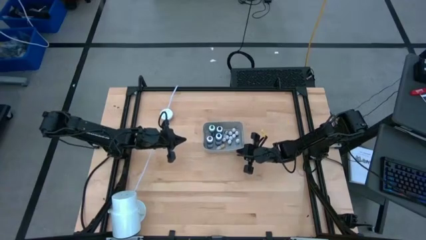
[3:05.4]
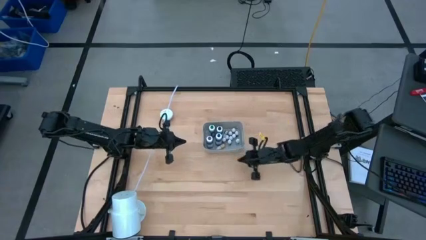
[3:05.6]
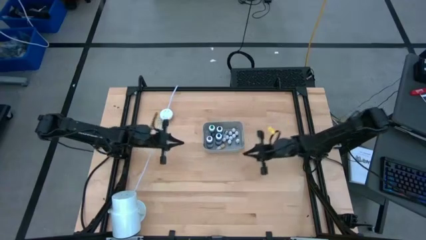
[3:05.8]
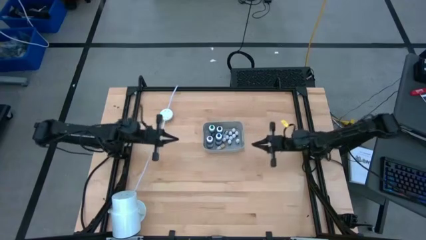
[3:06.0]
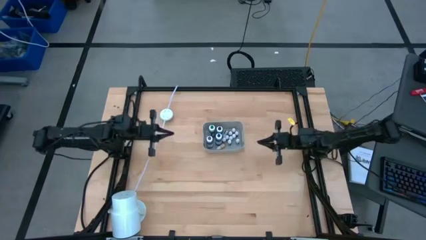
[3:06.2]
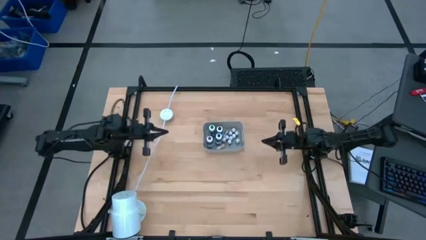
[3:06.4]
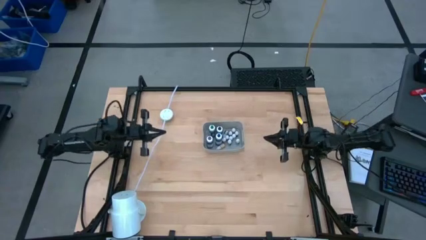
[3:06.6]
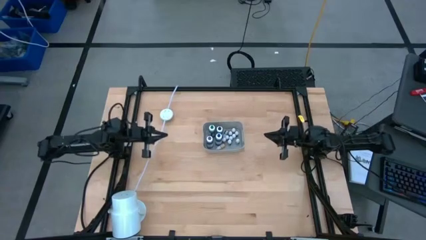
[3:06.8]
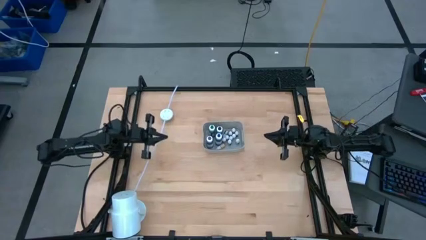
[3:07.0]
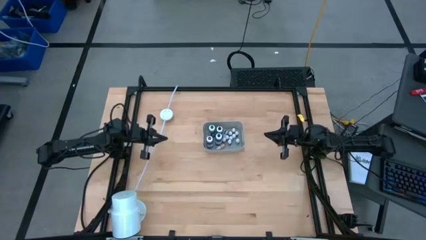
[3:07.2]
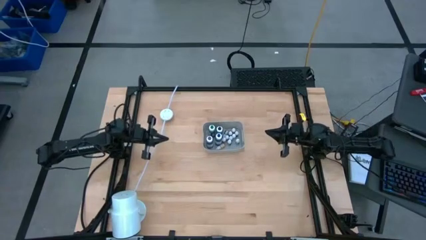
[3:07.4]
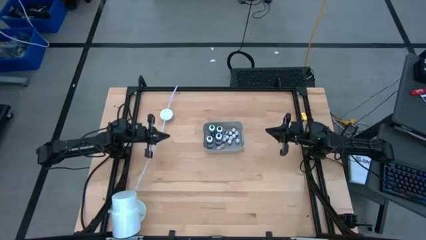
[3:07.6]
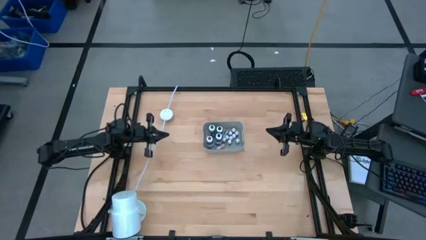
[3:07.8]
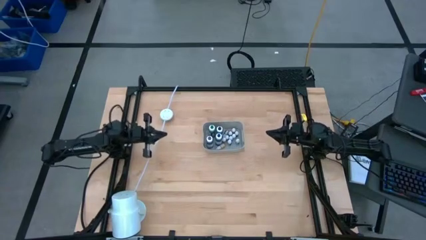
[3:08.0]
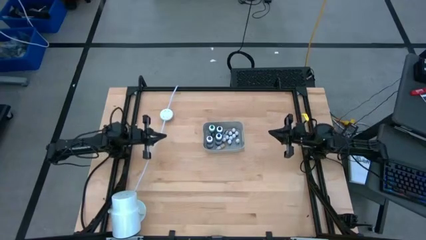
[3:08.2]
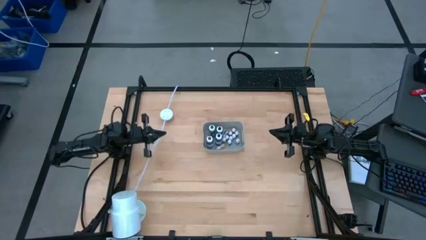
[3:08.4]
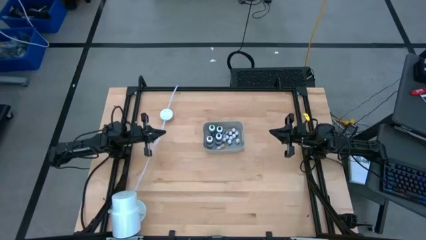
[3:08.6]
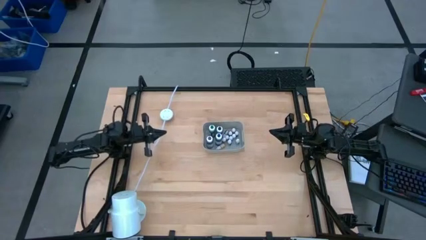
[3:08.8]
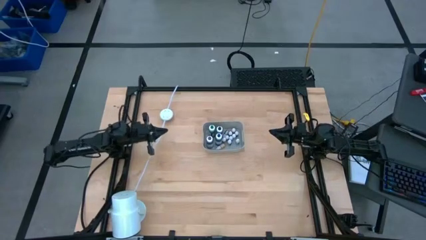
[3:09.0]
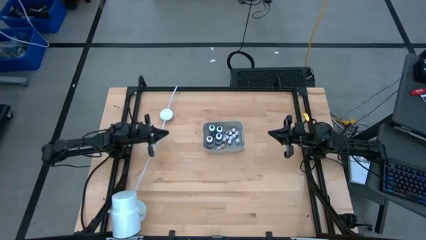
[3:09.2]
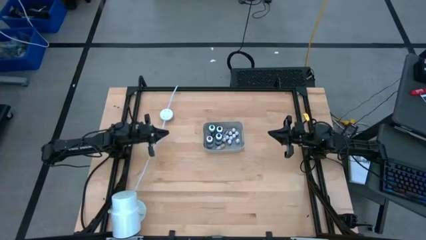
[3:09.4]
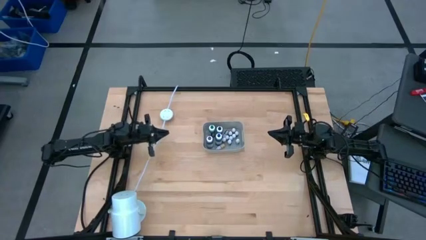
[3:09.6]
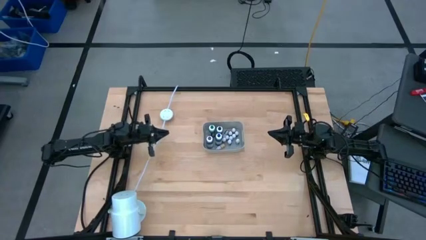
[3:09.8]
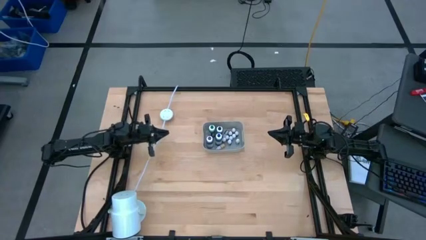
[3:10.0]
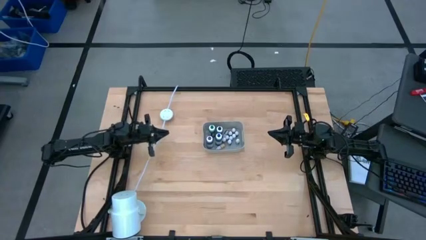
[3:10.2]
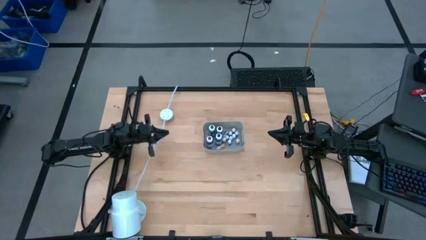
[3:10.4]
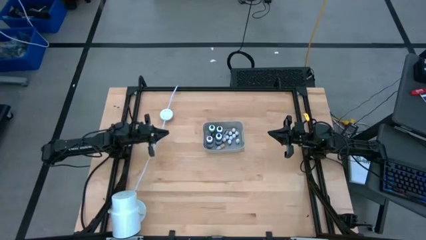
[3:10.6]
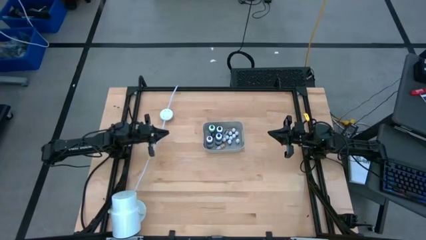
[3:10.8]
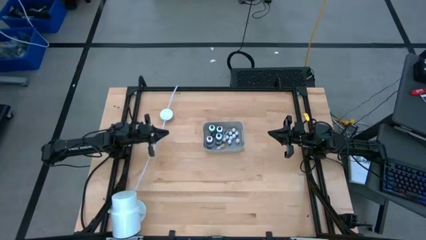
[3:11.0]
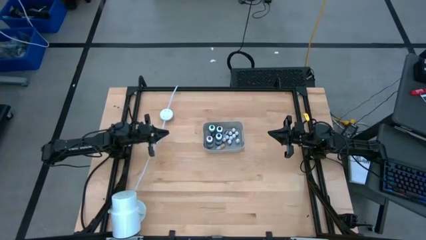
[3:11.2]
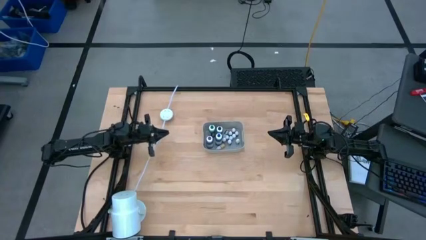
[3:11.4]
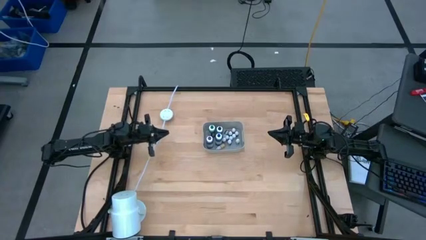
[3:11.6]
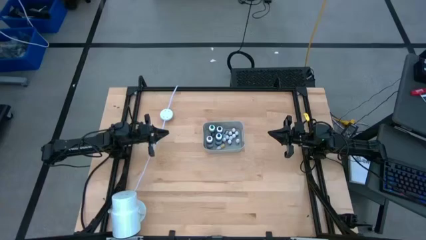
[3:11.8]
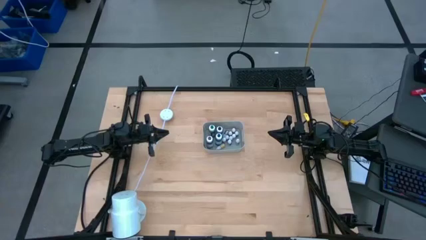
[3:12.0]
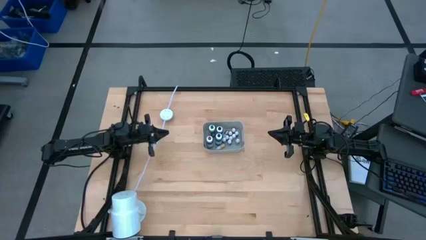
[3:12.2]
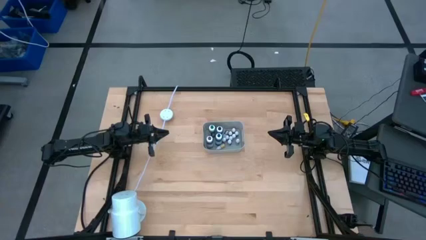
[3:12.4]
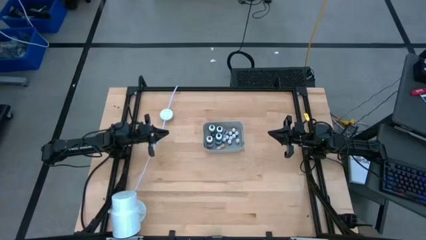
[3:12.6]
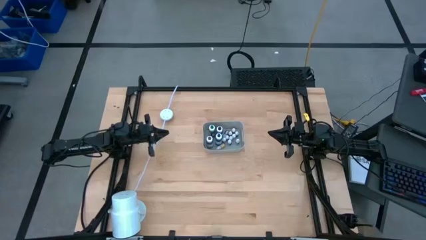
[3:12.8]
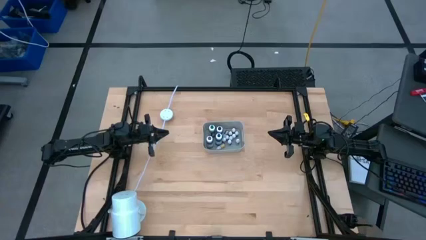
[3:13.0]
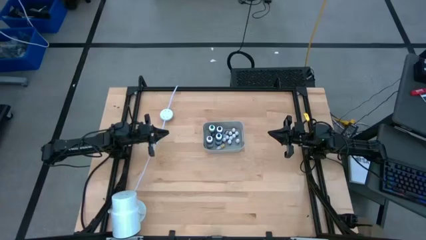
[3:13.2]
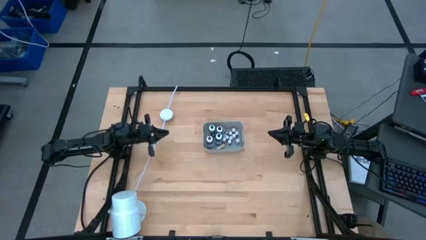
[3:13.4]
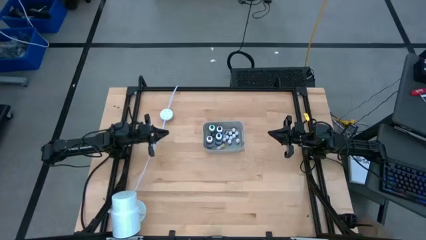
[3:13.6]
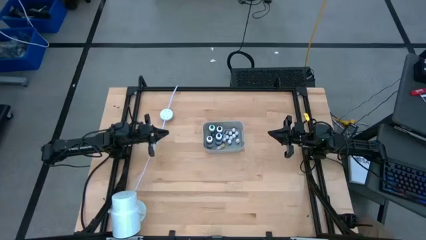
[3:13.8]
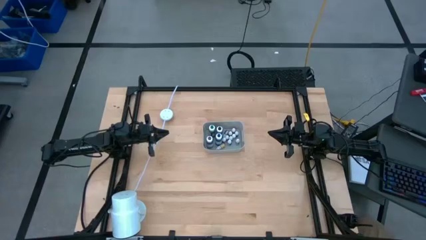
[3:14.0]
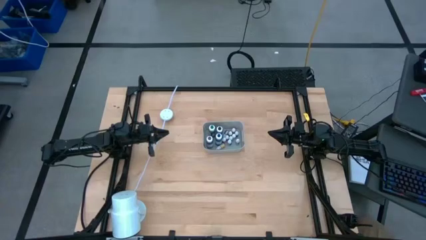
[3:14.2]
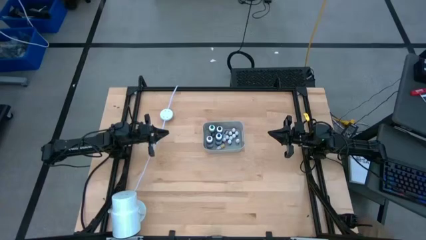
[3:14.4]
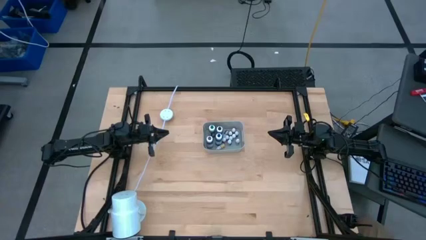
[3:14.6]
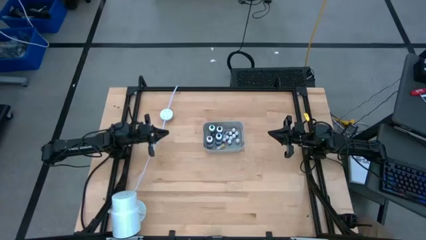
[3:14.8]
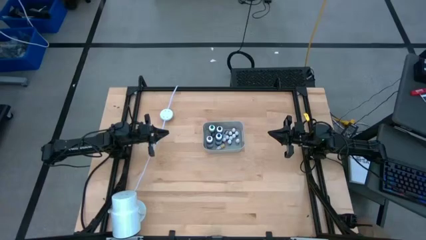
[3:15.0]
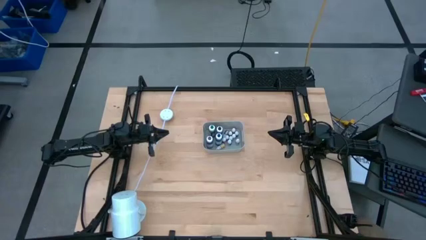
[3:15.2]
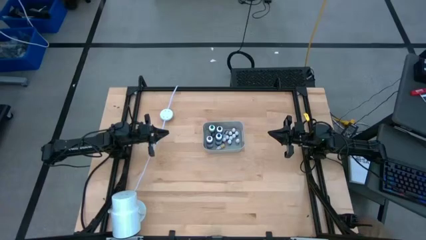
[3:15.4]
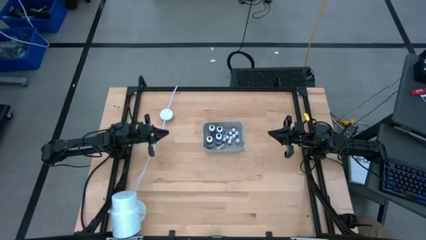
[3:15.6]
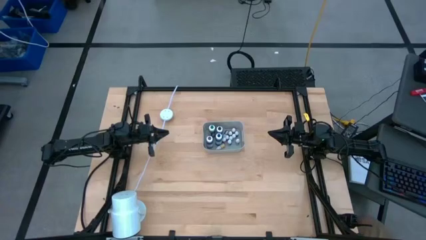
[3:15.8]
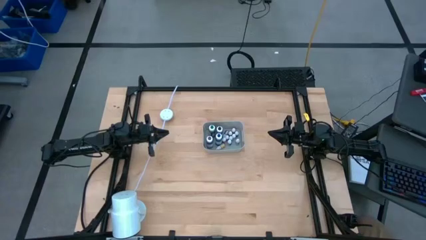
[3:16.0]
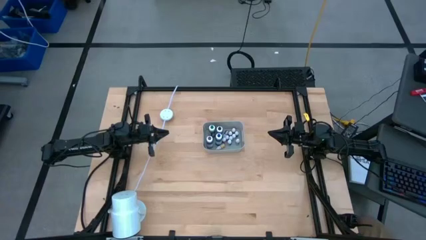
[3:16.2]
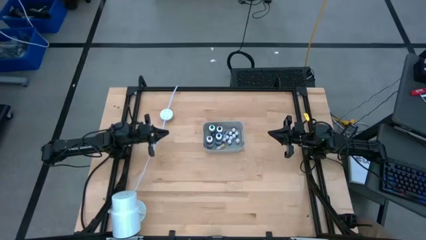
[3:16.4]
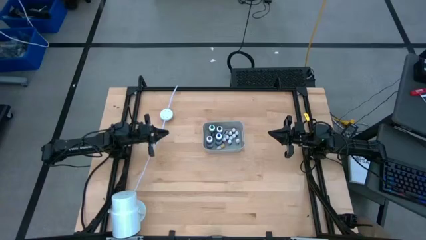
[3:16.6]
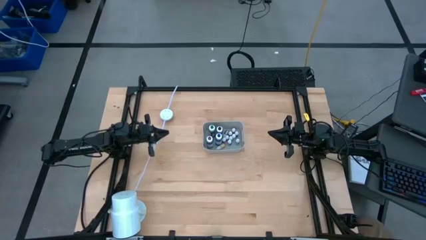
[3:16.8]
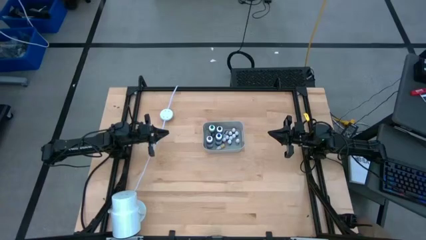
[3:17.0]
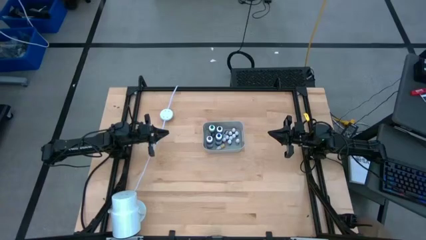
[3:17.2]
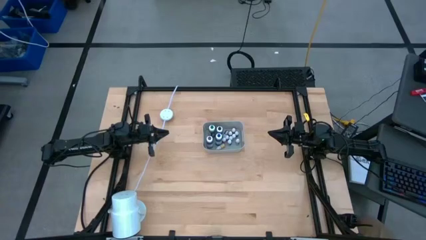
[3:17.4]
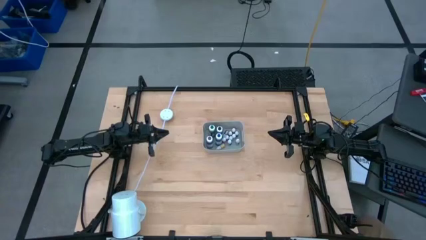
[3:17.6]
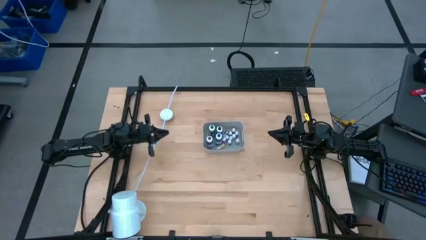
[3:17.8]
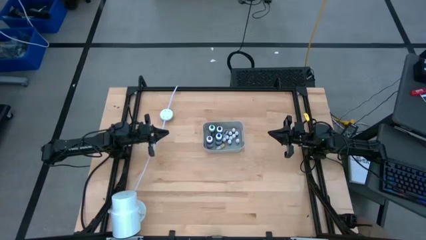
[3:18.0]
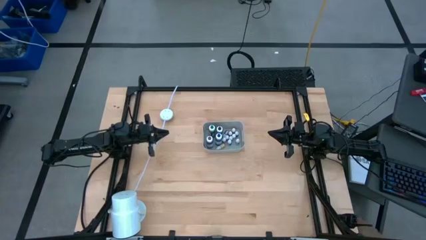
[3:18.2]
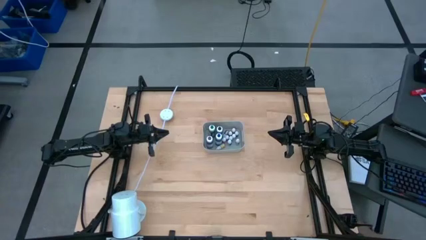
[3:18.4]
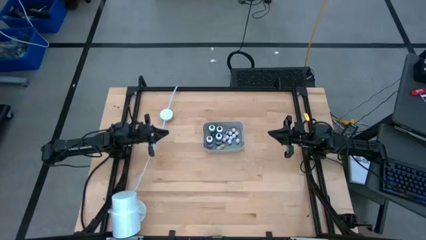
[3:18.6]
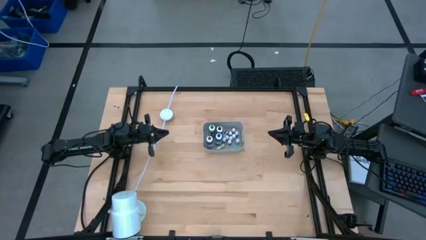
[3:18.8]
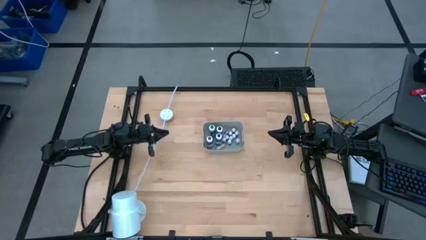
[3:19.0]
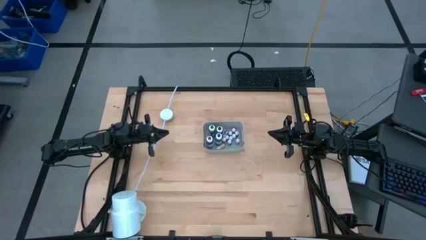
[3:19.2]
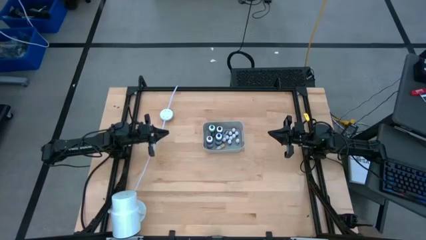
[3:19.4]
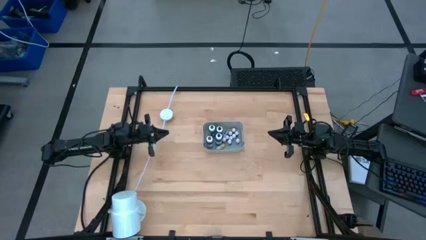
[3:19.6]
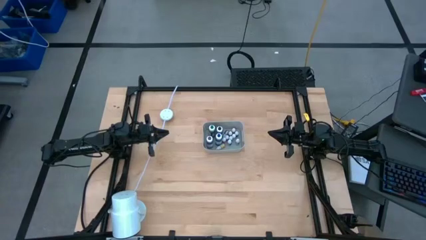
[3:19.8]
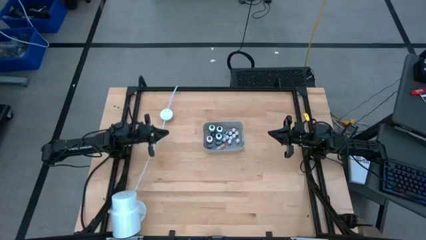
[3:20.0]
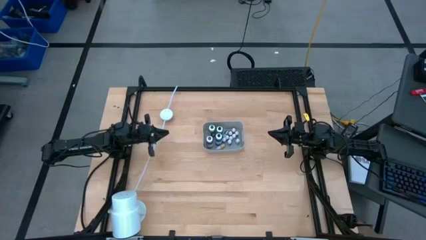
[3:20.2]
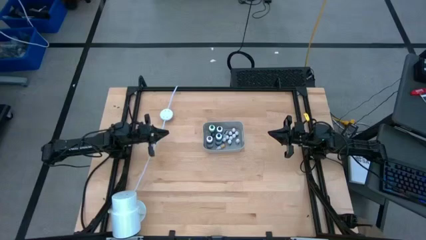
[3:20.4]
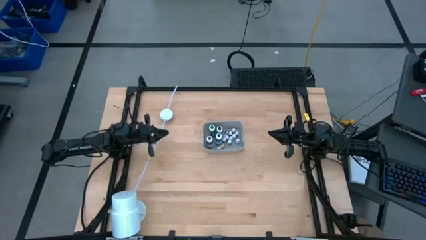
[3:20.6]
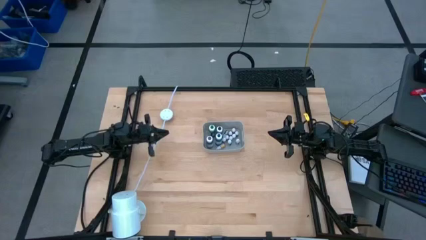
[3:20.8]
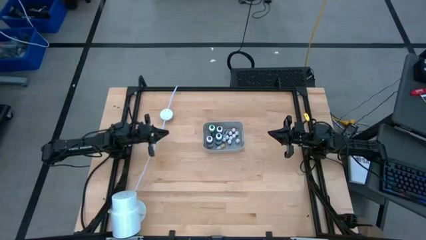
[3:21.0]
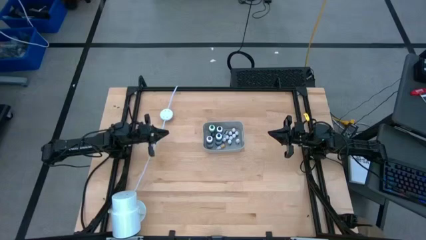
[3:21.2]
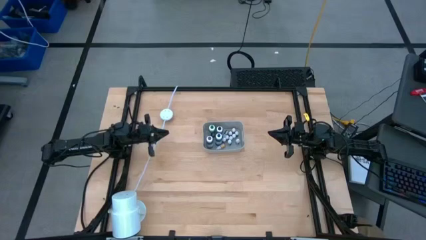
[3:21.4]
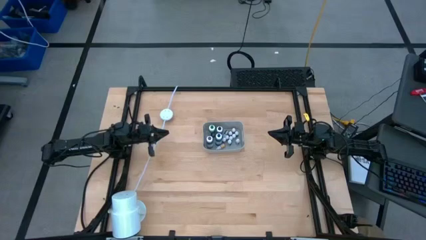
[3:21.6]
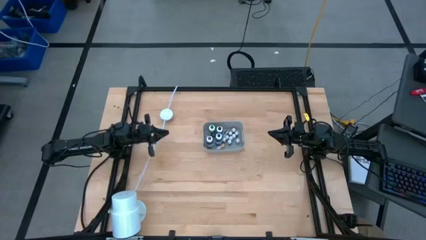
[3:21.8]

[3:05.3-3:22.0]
Task: Pick & Place food coloring
Return to Home Position

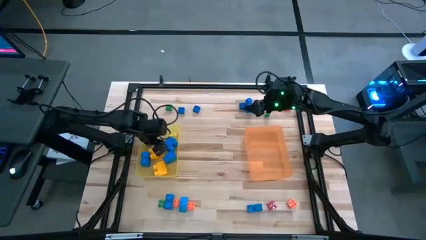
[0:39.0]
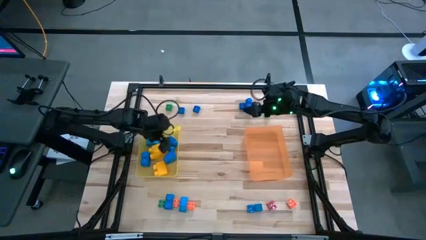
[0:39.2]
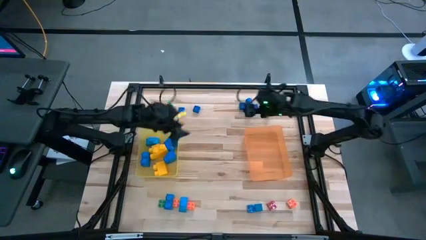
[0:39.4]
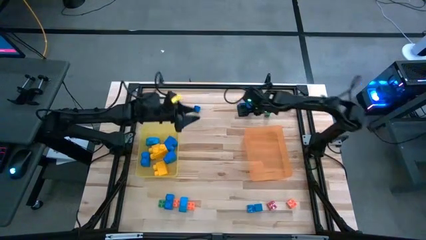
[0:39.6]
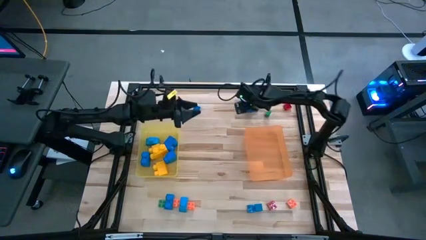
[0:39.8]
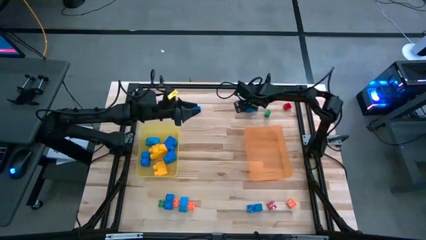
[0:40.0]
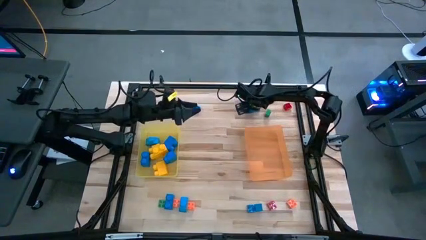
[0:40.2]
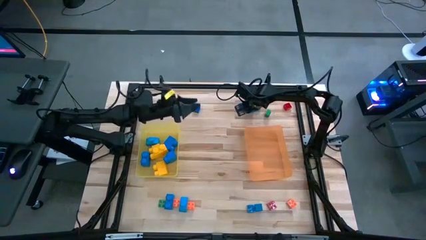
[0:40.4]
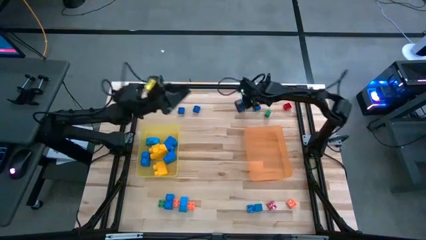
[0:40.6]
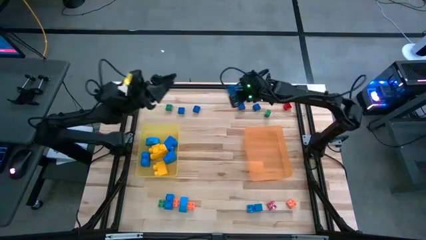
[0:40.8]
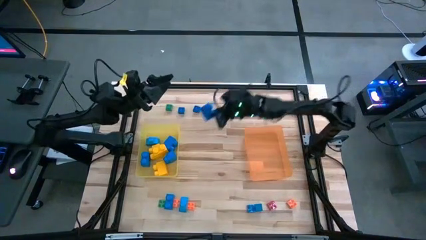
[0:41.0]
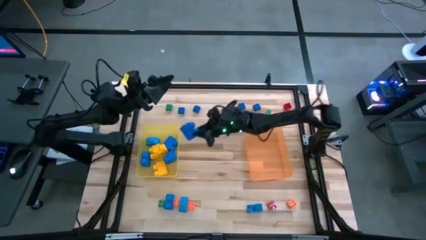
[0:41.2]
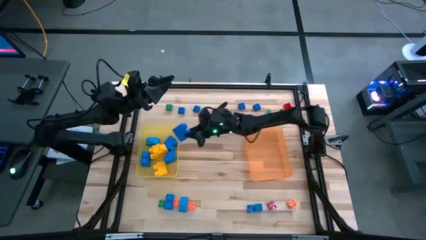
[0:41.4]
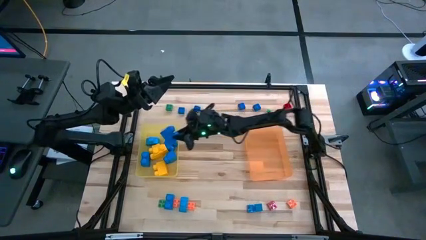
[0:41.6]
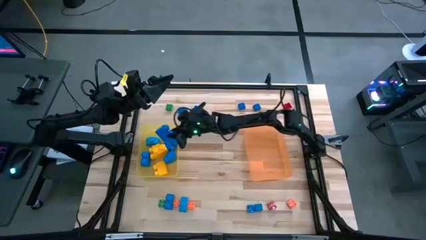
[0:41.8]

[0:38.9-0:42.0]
Task: Sort blocks by size
Put the large blue game piece into the yellow bin
